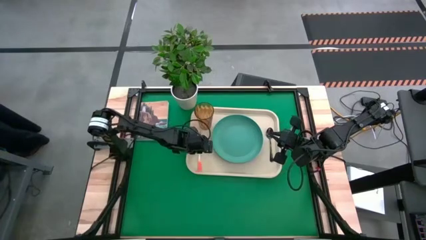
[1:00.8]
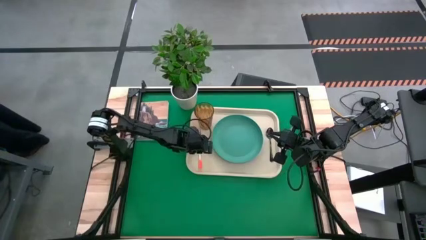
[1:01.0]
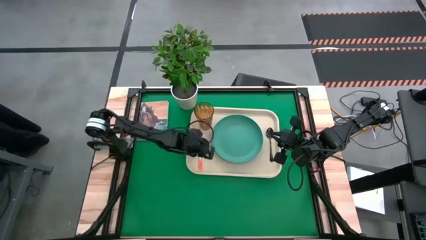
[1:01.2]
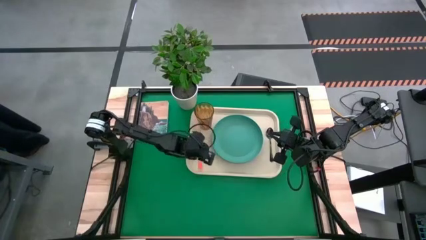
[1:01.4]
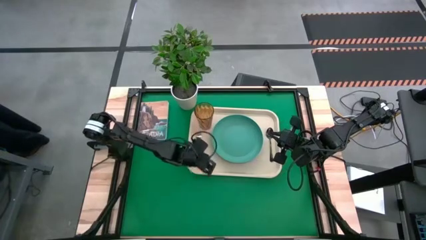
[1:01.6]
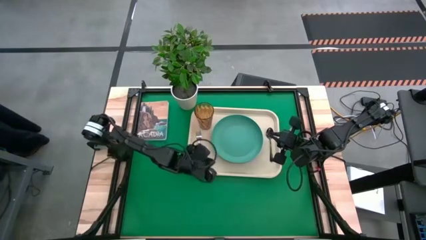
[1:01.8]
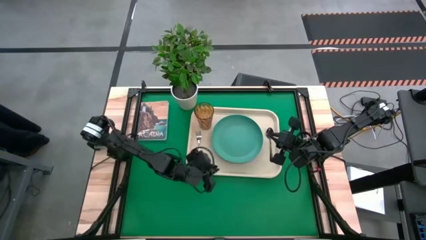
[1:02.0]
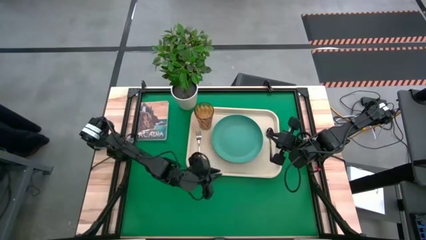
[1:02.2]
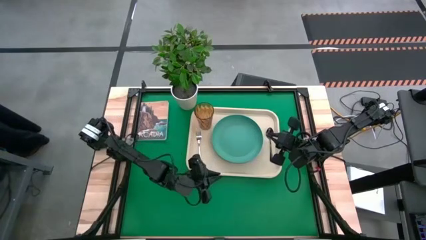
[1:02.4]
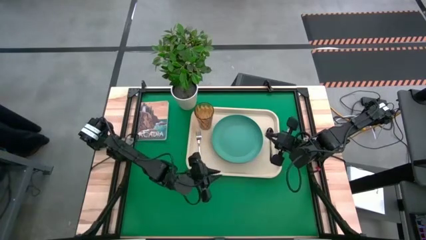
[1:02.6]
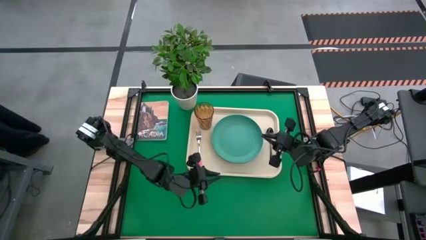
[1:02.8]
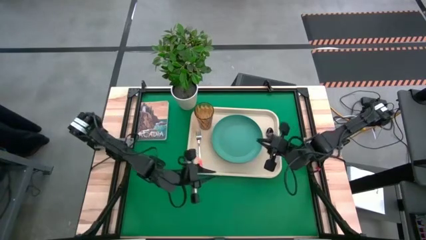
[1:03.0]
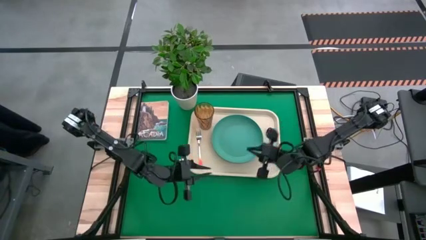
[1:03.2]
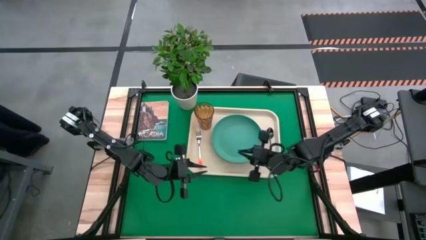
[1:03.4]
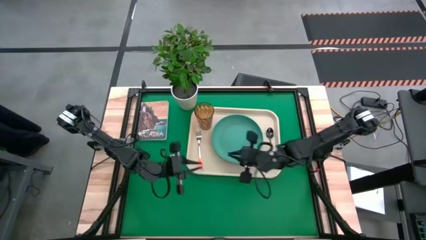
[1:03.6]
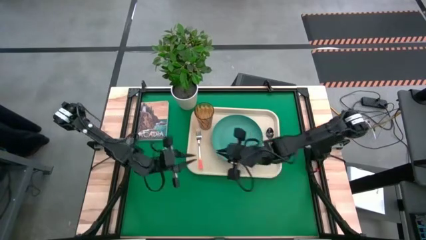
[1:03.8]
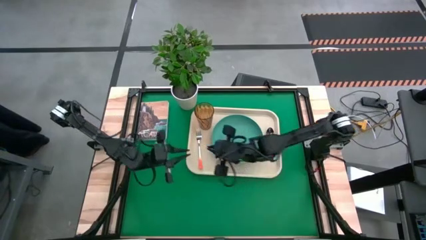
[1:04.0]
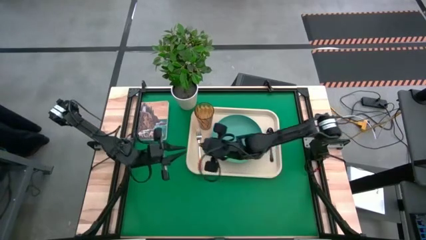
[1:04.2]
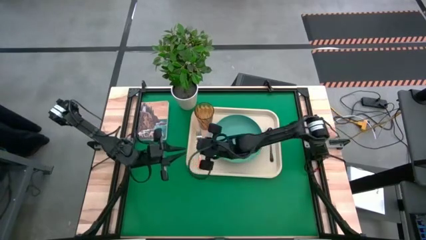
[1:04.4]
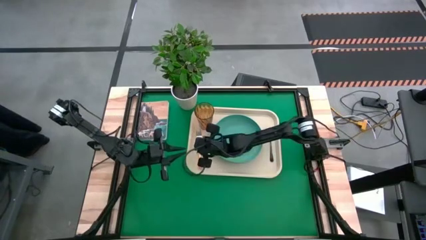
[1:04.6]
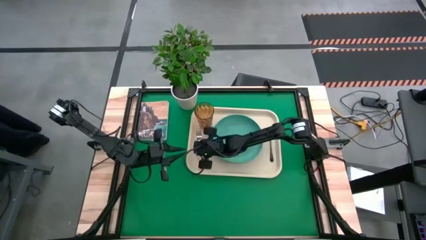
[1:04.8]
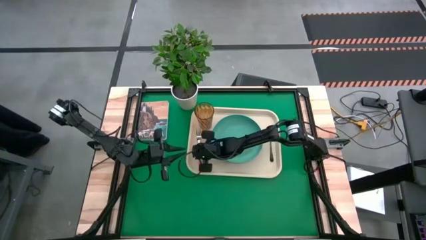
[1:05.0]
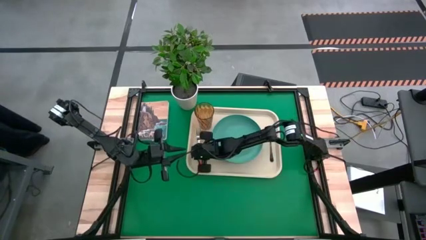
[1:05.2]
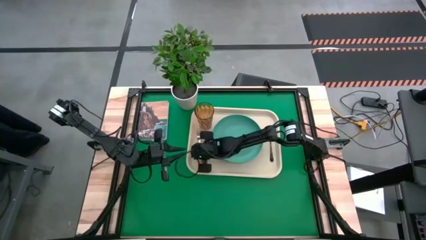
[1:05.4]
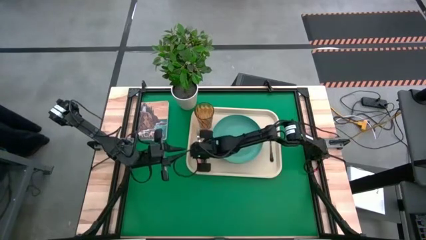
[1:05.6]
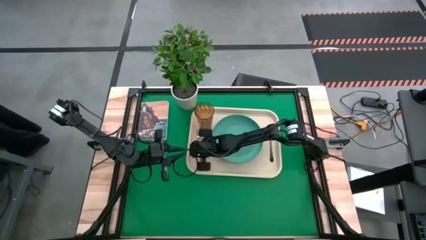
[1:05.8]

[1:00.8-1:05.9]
Task: Pick and place plate/cup/fork/spoon on tray
Adjust the orange fork

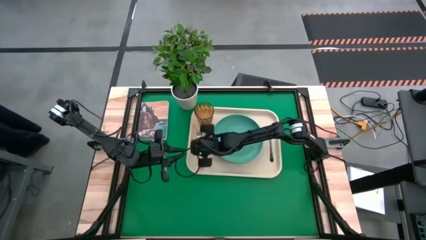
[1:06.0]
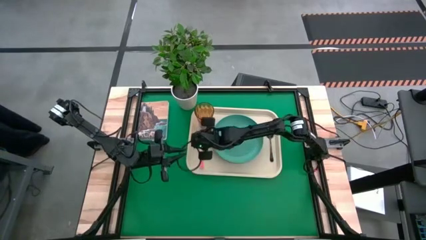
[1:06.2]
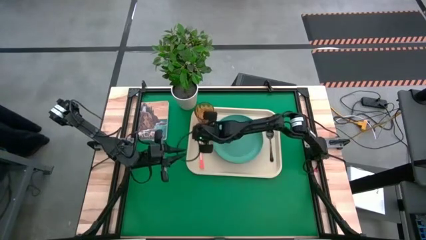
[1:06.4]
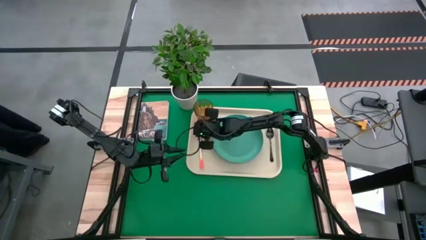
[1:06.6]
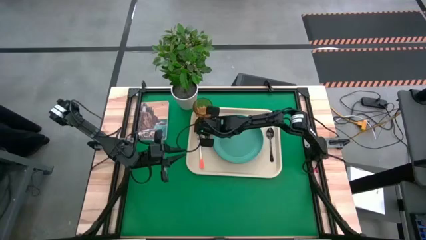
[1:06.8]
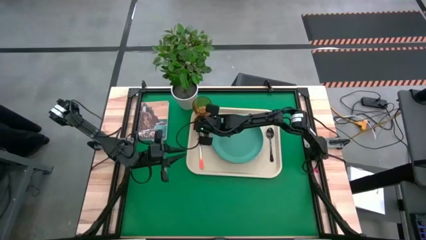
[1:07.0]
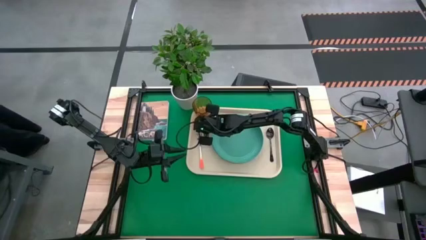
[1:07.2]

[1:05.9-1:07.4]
Adjust the brown glass

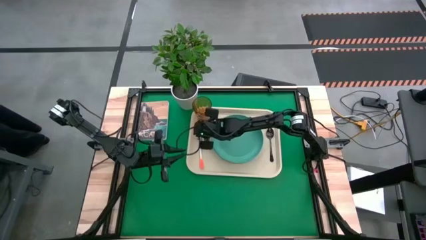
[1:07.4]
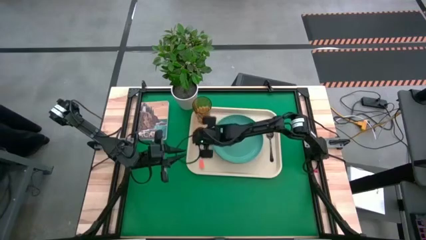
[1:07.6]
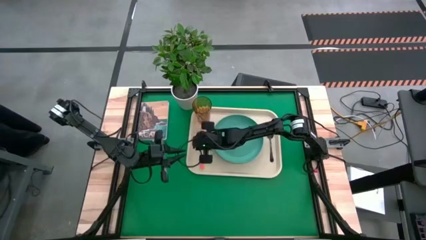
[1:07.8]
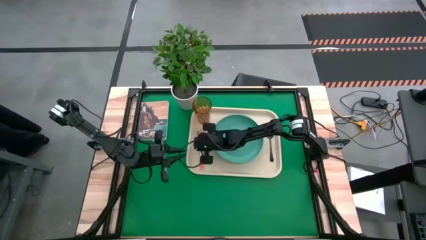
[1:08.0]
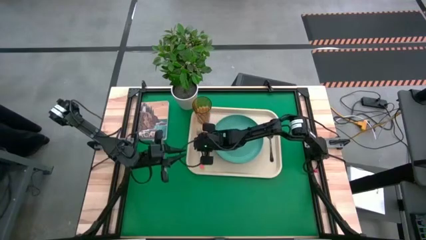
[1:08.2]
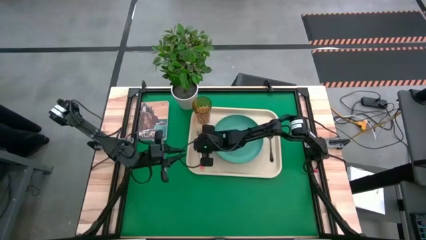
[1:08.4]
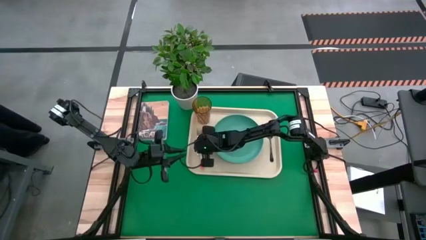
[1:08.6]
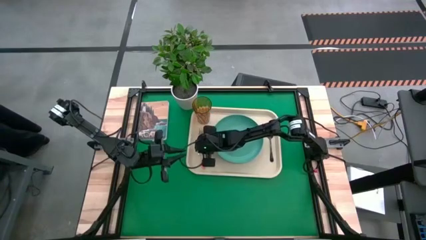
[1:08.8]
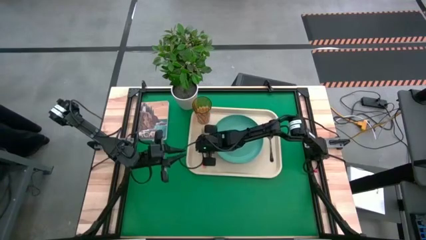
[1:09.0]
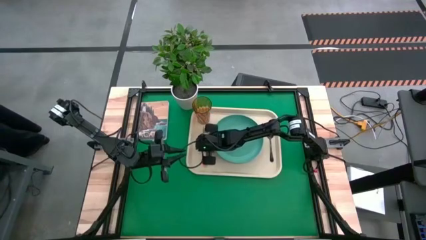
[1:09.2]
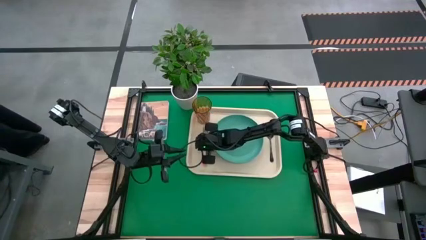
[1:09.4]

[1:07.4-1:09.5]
Adjust the orange fork

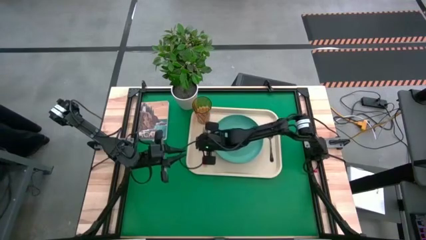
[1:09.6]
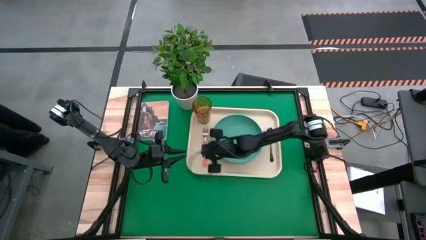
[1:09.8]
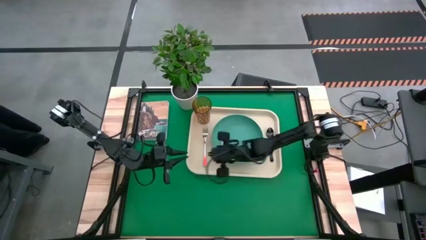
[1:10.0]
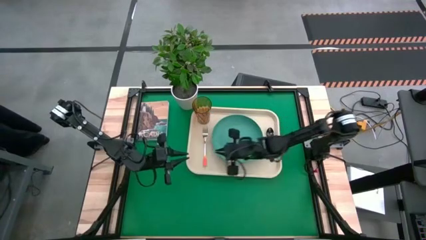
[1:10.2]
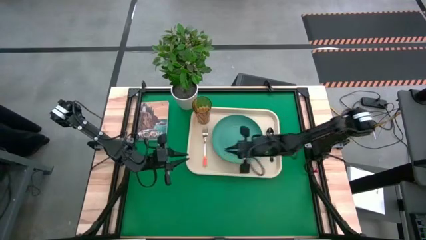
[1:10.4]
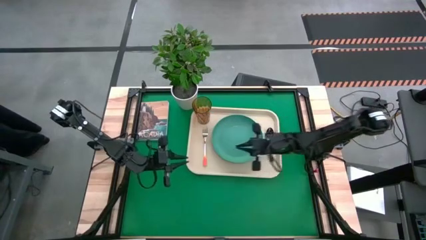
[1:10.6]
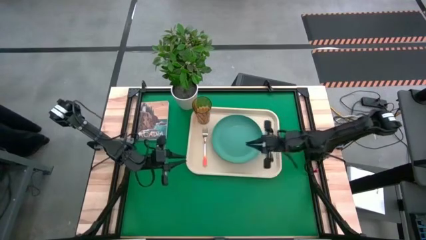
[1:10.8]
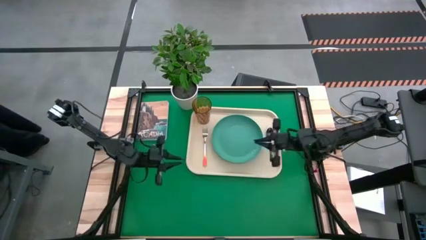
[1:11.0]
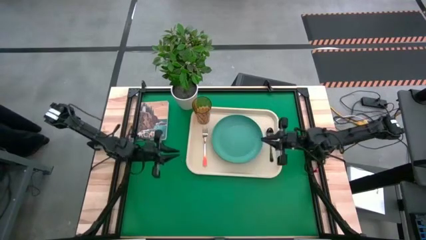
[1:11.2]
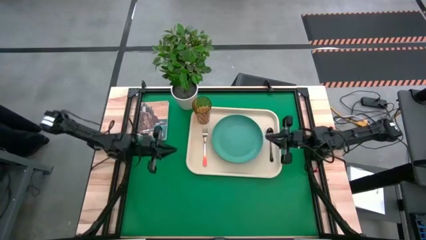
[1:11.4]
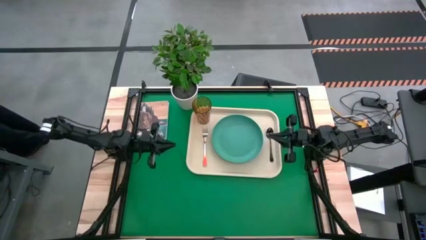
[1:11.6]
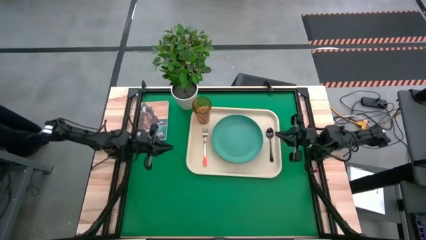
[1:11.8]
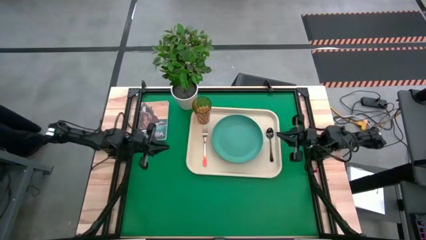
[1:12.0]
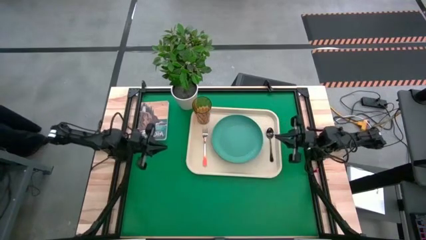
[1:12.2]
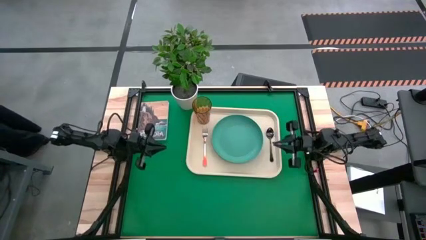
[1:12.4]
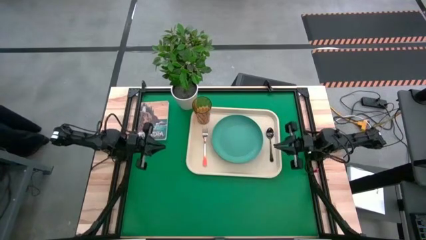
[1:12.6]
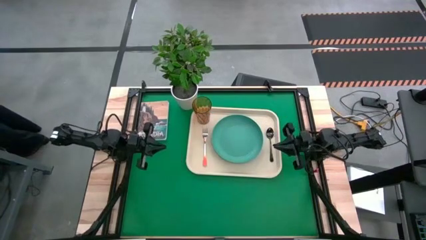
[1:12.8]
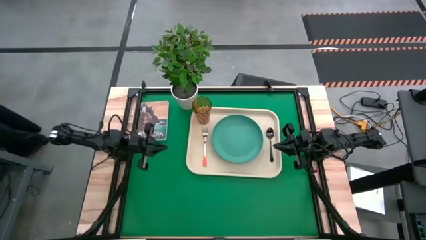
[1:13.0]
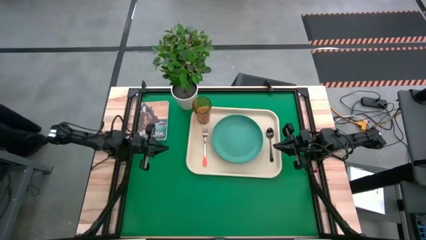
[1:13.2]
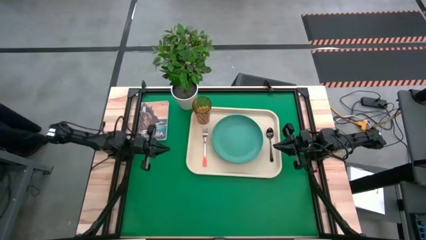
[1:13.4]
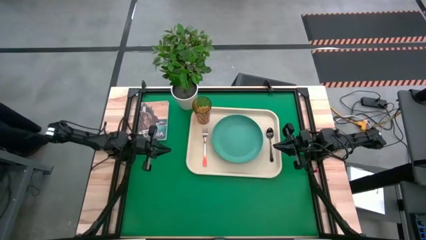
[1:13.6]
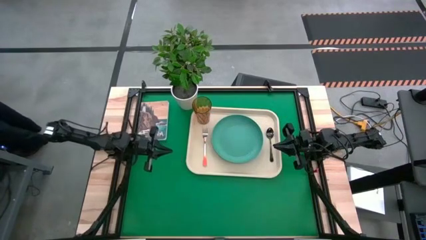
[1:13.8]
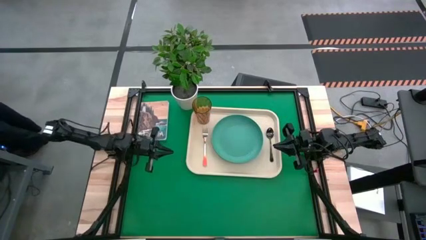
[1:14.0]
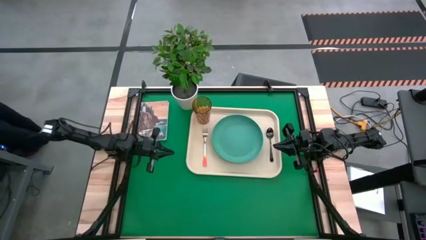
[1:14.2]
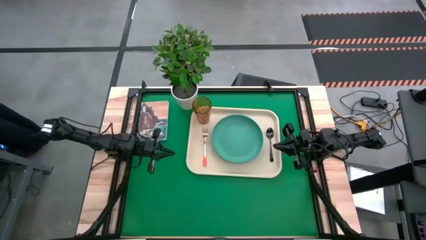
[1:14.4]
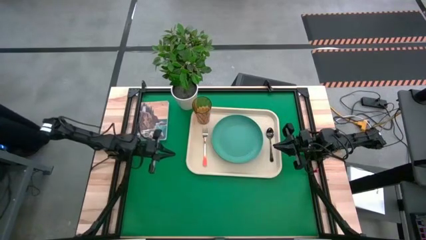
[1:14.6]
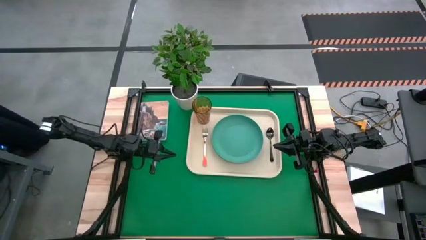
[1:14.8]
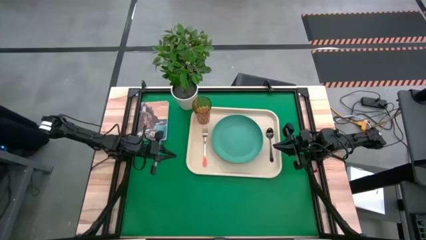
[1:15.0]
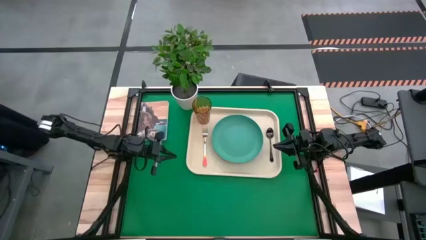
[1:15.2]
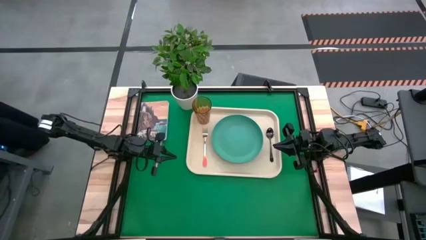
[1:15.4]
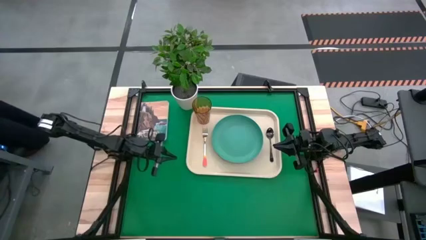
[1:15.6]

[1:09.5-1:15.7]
Return to Home Position

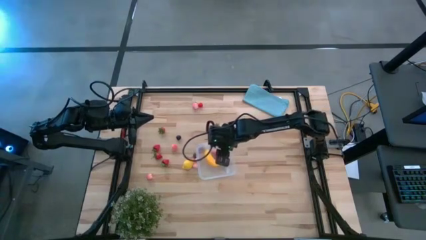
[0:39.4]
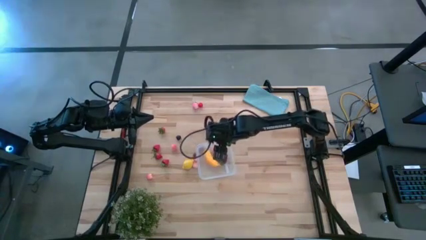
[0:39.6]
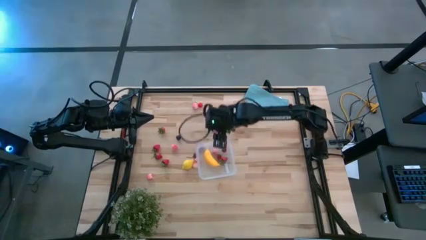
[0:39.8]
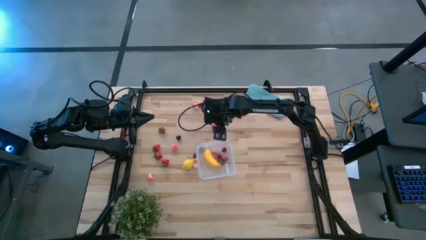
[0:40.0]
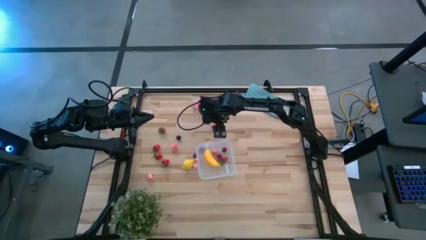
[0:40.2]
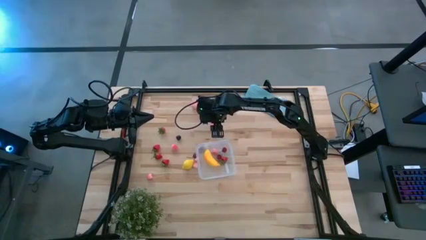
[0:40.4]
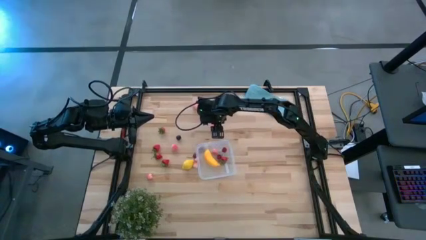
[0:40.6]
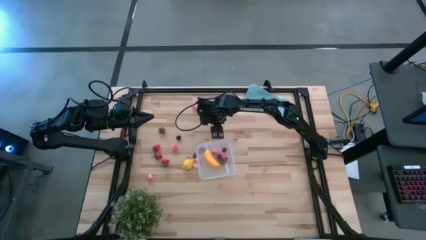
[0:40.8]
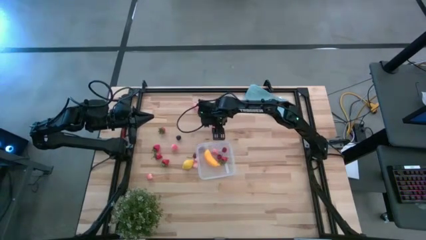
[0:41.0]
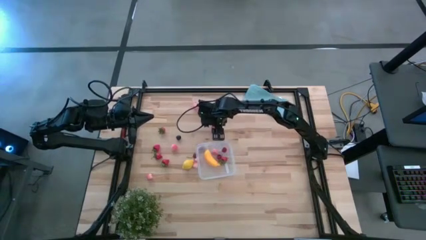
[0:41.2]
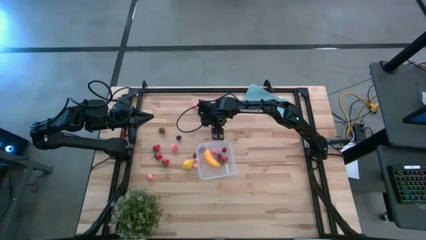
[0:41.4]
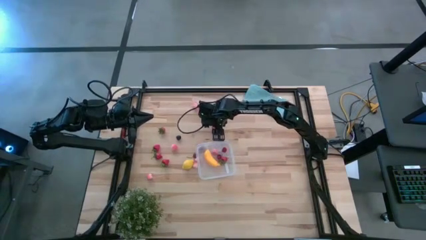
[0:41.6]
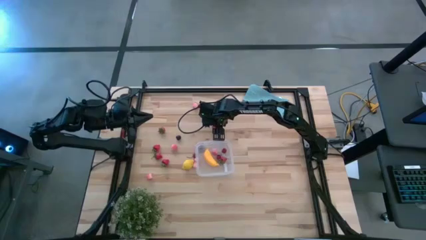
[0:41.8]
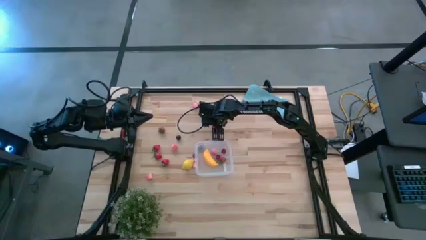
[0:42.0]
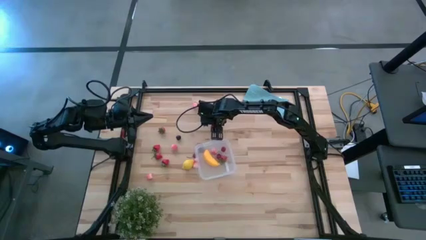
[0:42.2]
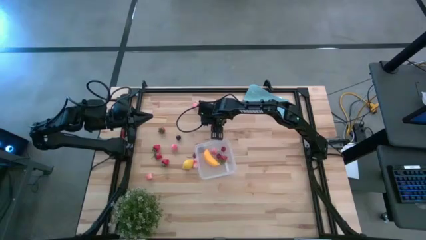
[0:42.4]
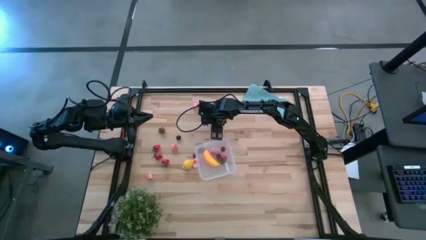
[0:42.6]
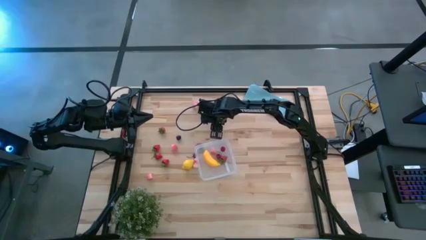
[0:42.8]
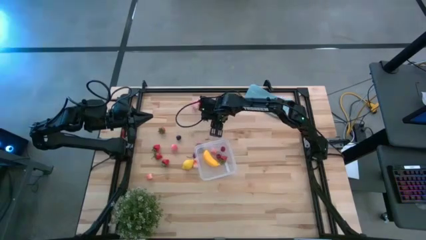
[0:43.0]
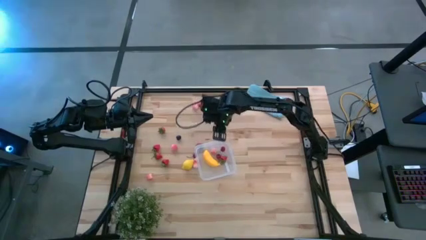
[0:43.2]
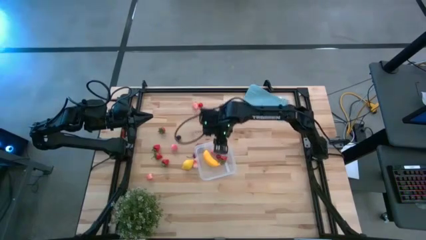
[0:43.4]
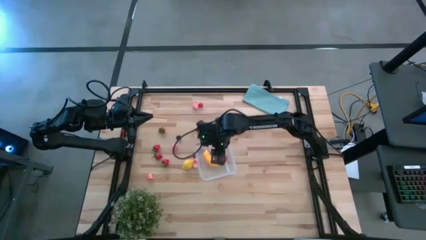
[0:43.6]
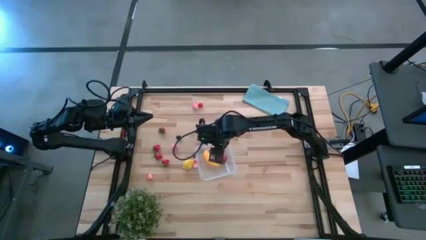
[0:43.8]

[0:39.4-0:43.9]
Task: Pick and placing Produce into tupperware
Put the red strawberry into the transparent bin
